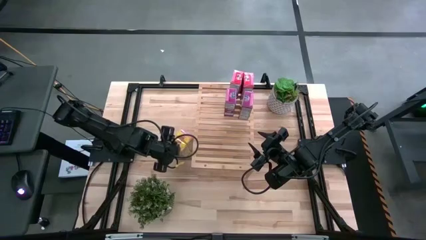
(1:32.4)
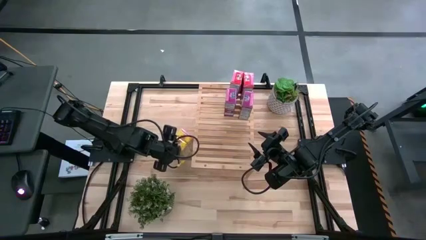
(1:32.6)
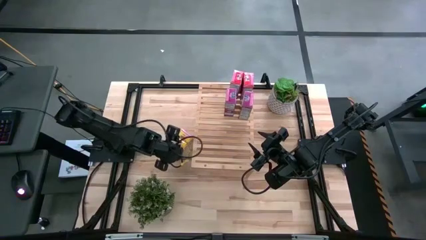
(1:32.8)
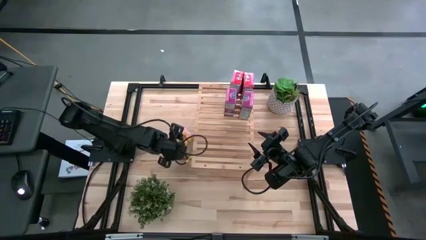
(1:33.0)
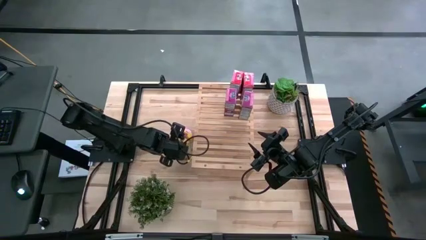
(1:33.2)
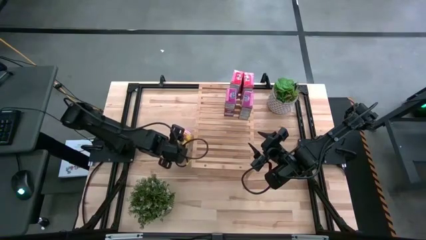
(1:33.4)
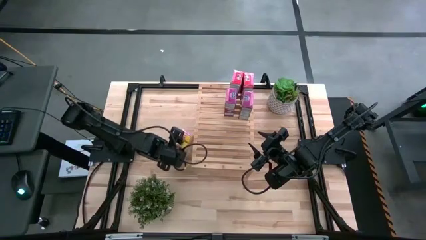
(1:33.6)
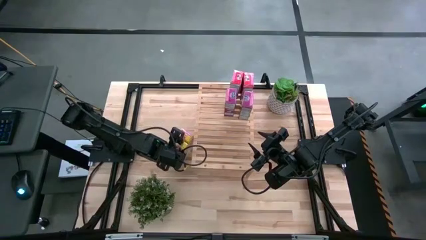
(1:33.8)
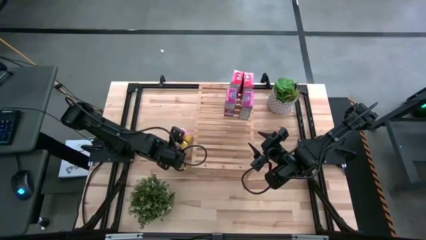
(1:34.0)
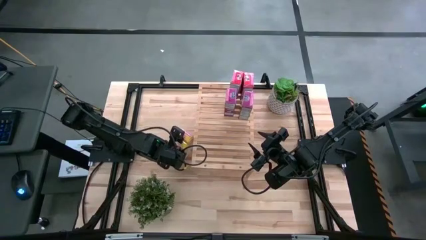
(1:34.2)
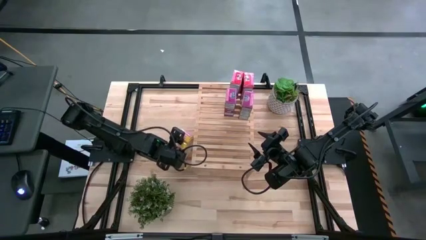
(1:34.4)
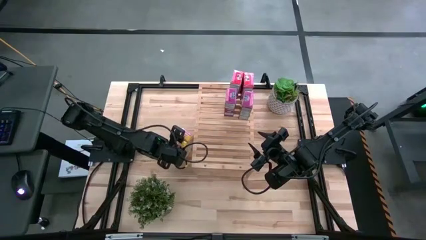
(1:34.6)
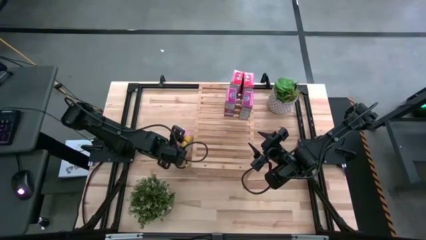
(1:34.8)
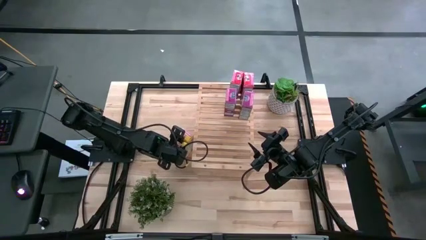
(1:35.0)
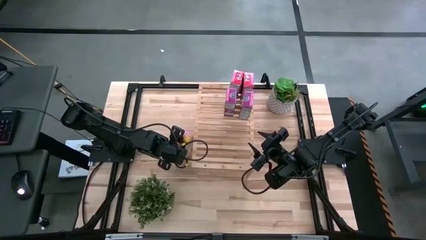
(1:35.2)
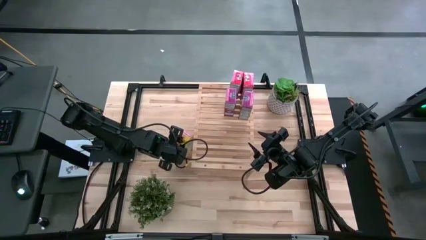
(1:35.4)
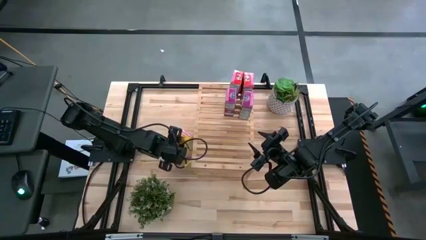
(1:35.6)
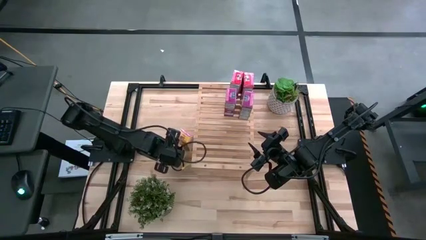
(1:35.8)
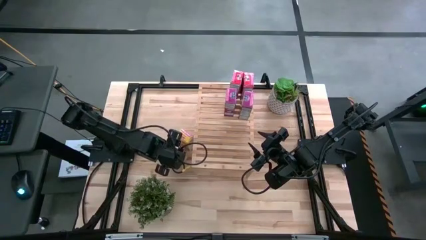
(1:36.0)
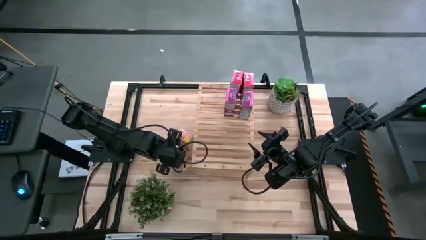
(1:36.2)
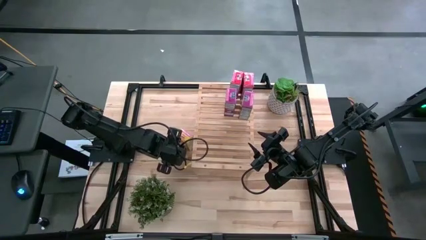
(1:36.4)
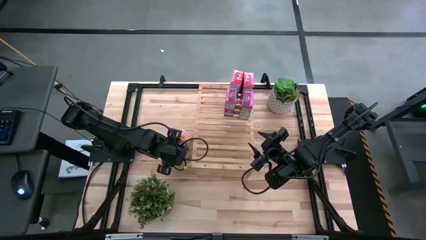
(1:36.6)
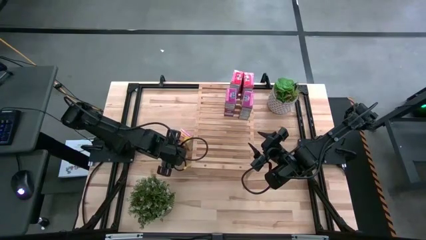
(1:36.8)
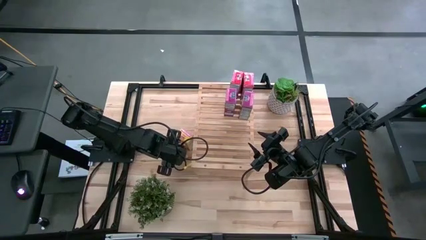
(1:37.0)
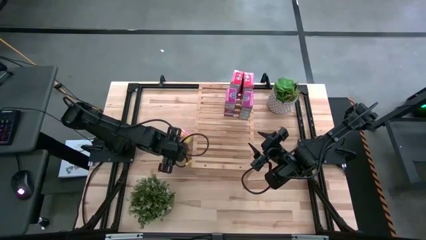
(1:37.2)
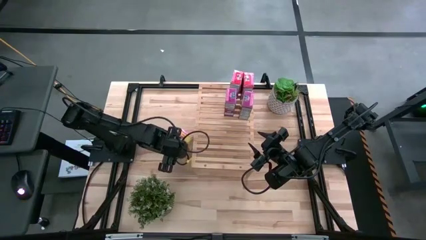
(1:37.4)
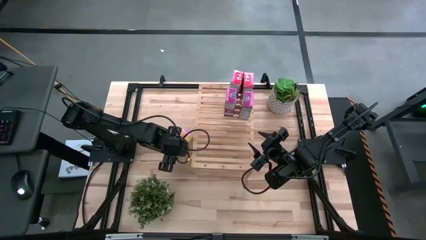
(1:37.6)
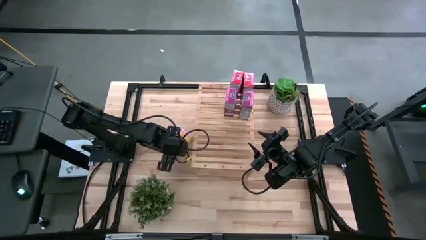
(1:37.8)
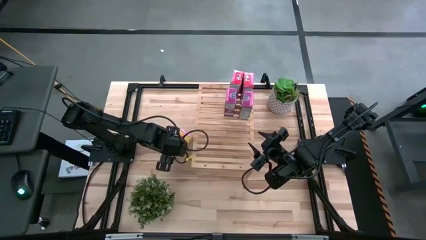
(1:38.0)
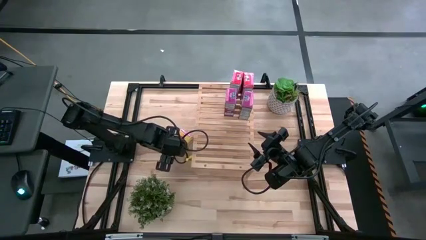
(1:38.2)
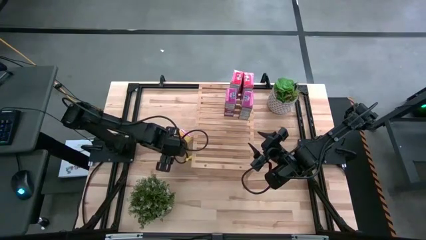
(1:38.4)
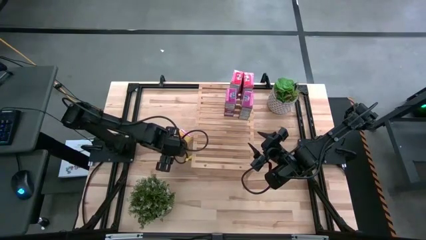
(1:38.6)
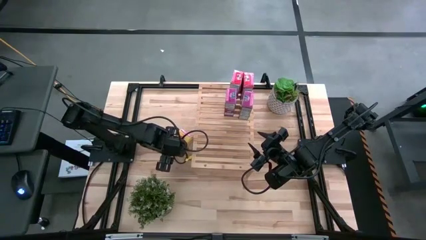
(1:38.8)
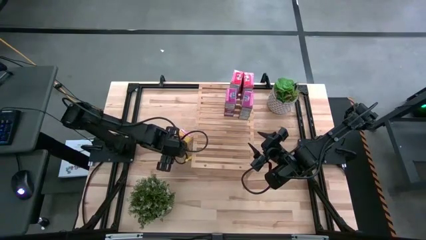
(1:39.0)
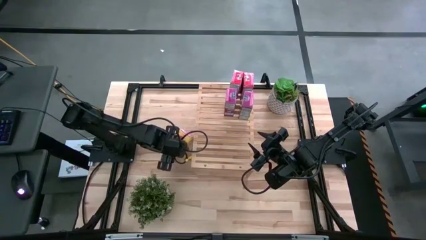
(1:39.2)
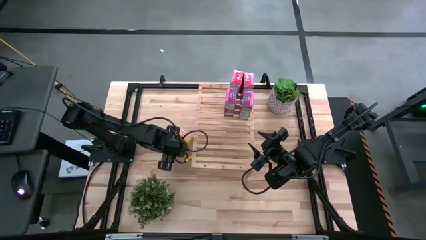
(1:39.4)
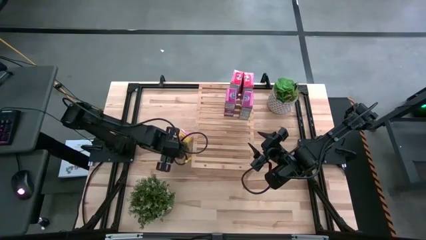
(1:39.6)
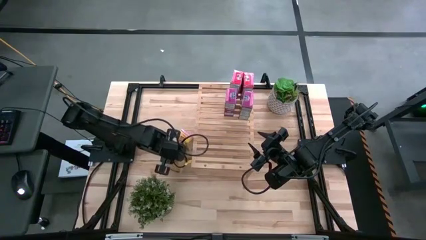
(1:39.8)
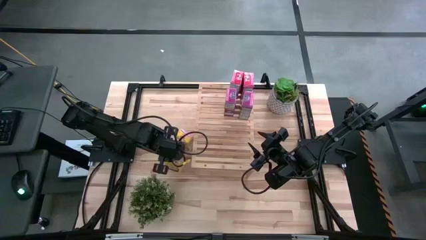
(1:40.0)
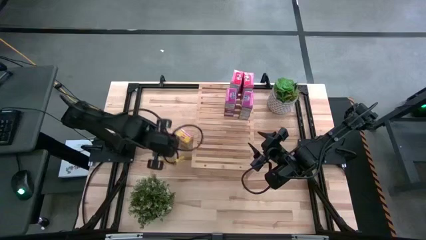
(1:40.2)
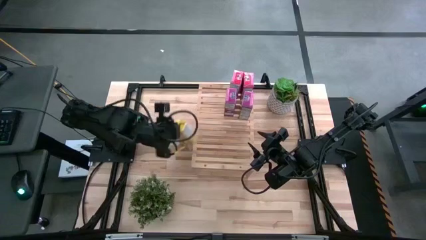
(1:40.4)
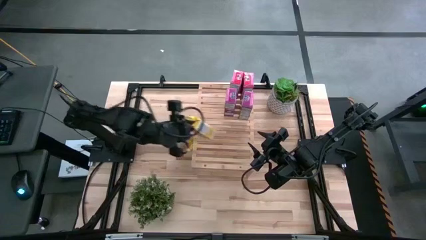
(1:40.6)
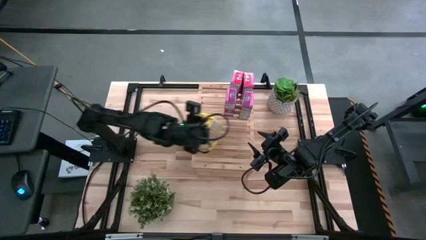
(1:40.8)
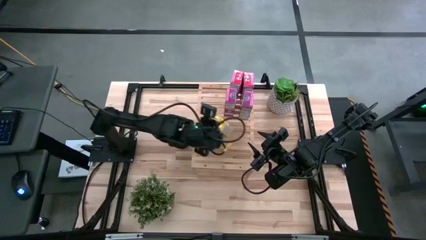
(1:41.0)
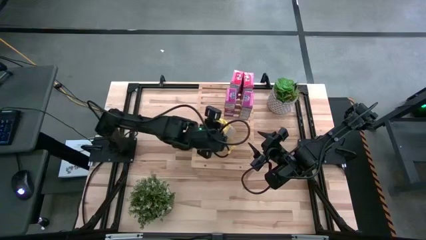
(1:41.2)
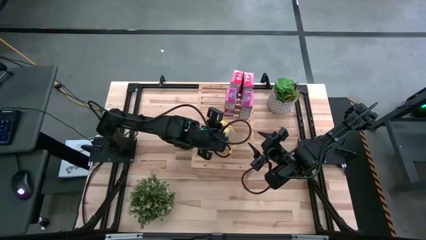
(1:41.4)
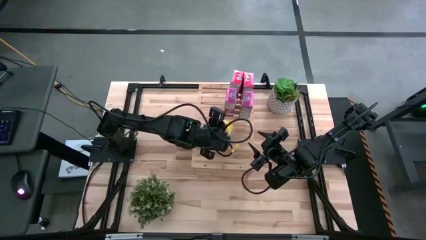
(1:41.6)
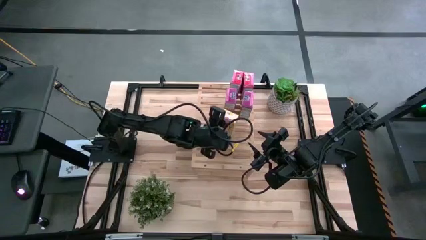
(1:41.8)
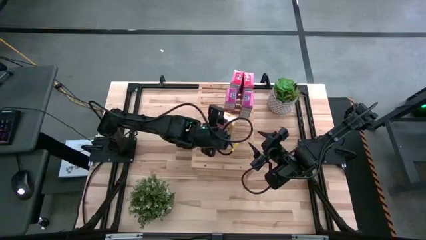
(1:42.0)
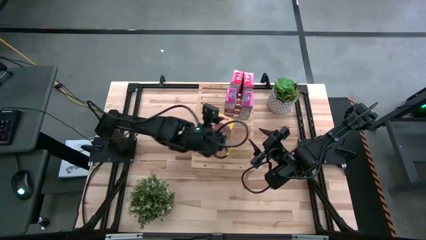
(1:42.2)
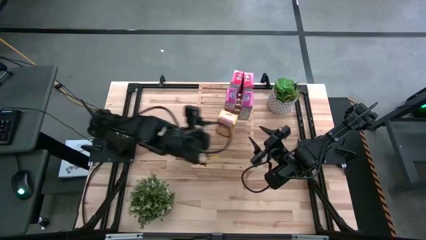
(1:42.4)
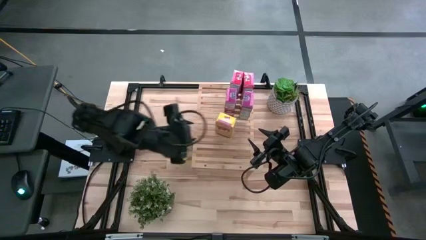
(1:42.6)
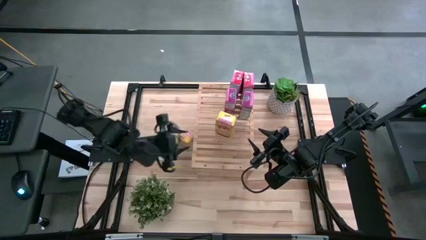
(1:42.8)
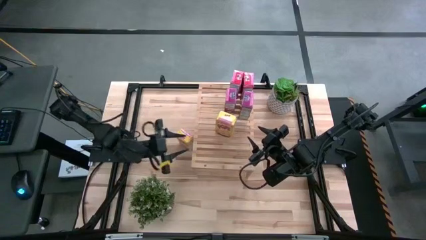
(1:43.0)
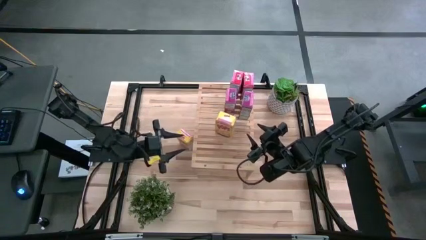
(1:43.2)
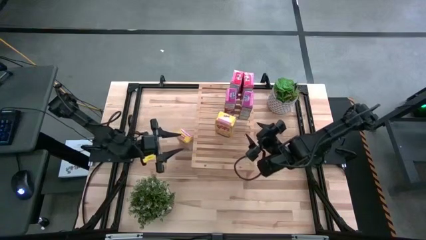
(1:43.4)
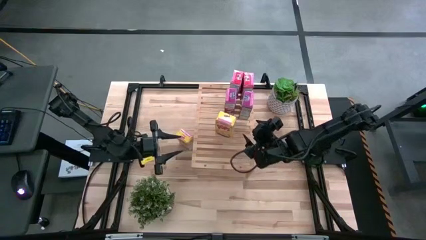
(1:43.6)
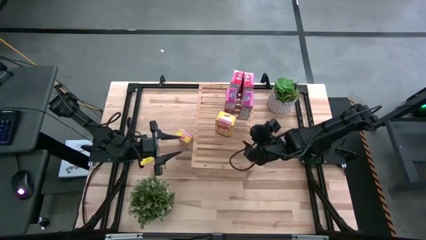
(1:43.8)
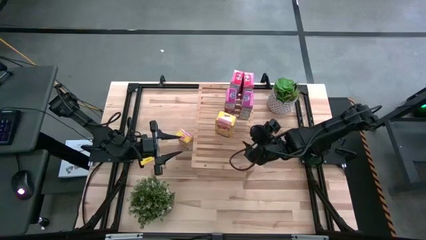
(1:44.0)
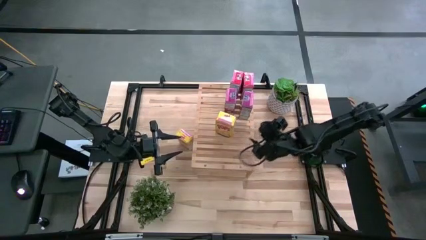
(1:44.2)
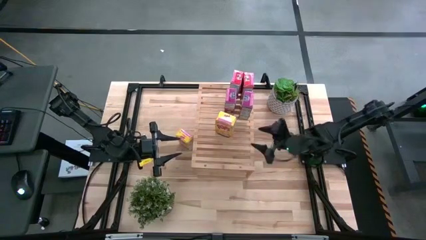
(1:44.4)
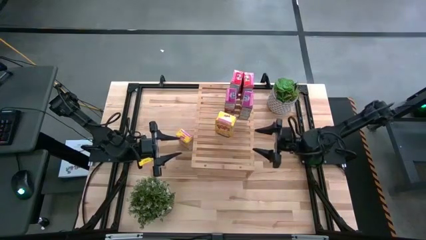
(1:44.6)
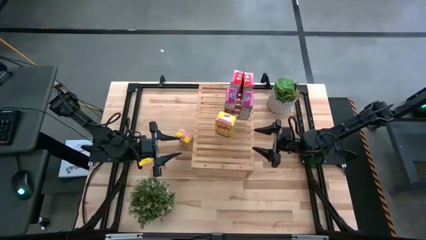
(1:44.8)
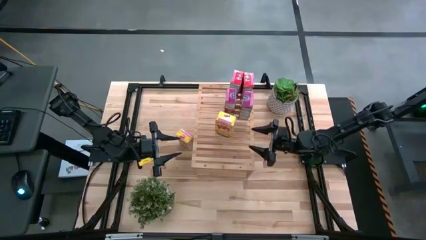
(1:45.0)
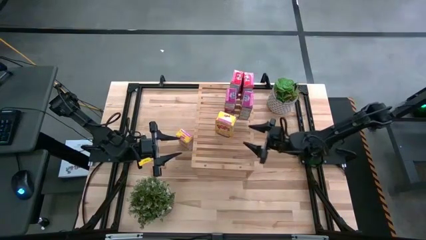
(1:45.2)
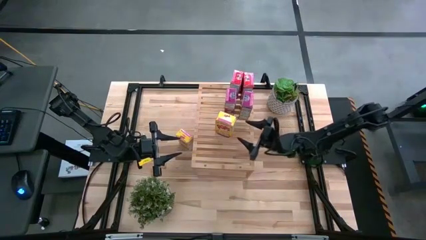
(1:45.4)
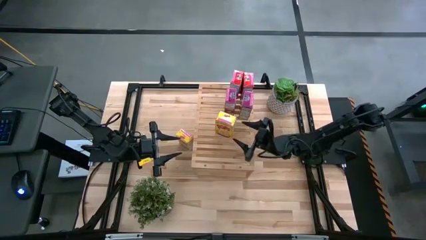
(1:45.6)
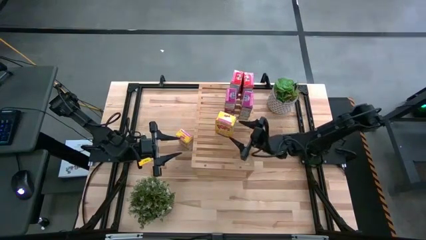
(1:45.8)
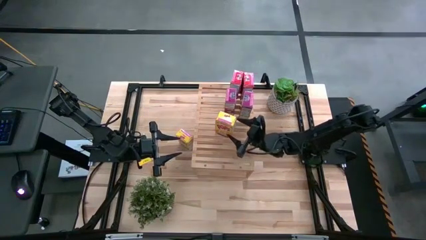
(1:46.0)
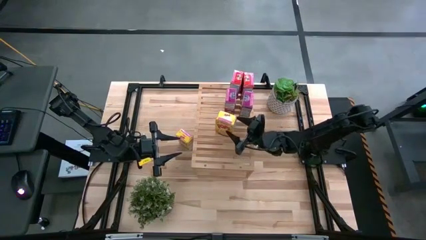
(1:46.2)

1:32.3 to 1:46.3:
Task: Stack cereal on shelf
Put the bottom yellow cereal box on the shelf

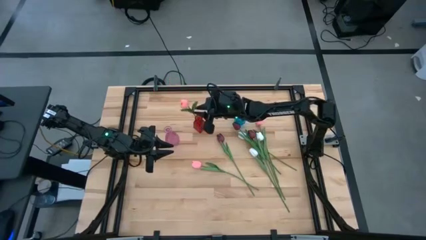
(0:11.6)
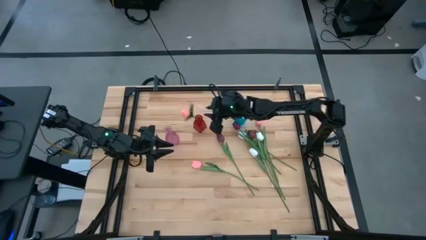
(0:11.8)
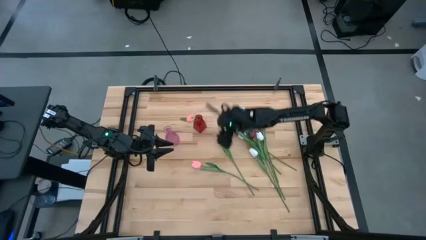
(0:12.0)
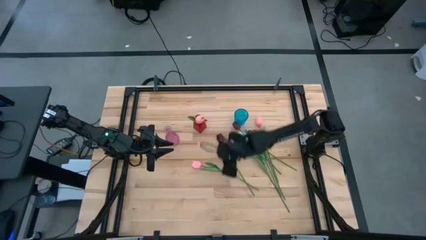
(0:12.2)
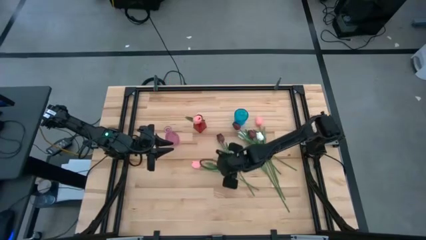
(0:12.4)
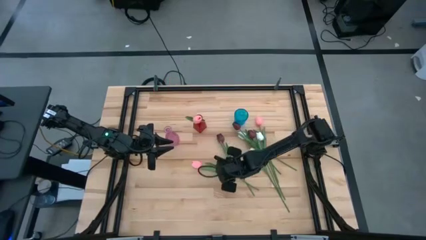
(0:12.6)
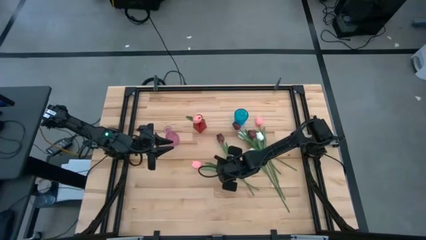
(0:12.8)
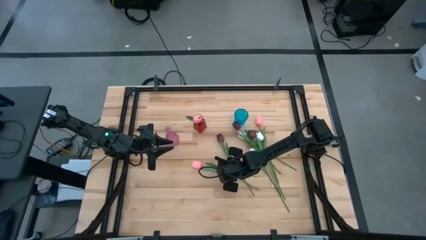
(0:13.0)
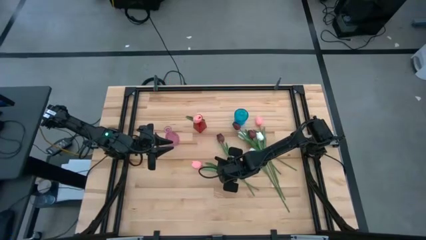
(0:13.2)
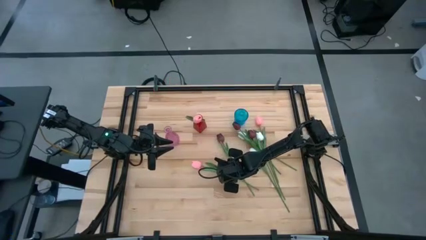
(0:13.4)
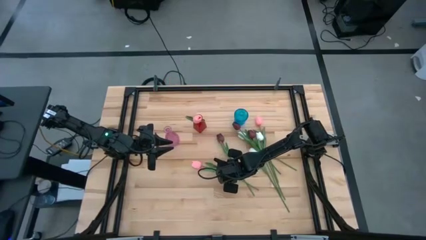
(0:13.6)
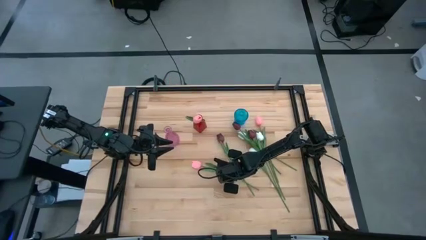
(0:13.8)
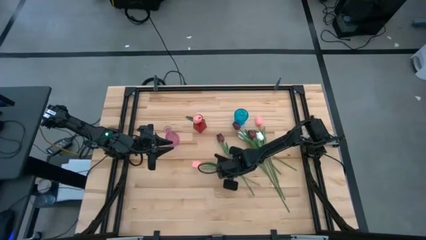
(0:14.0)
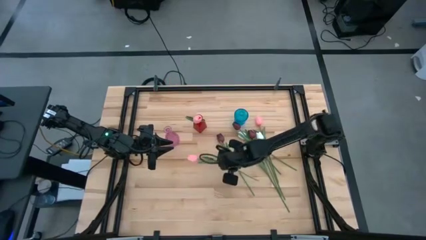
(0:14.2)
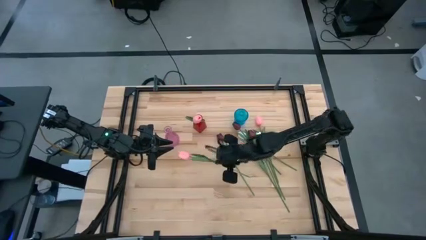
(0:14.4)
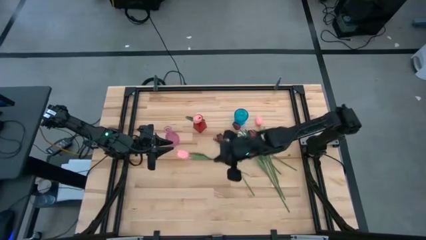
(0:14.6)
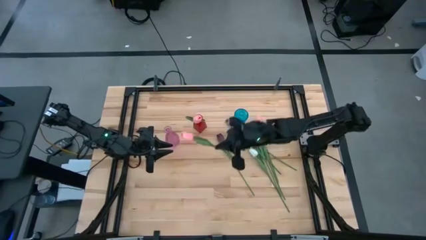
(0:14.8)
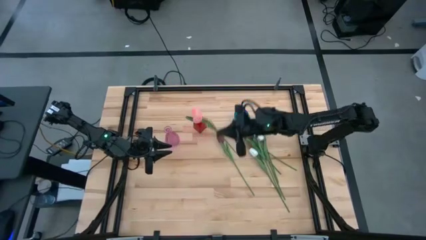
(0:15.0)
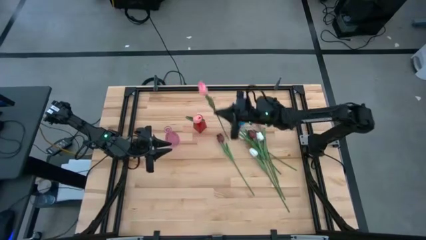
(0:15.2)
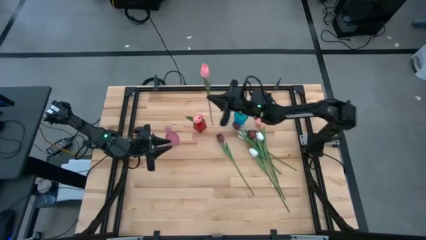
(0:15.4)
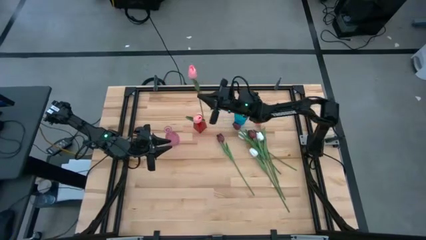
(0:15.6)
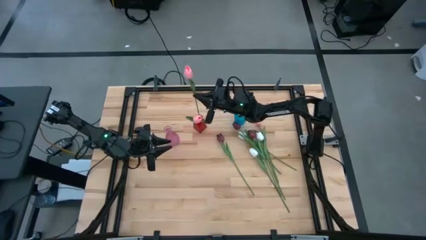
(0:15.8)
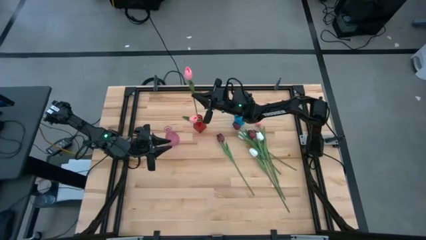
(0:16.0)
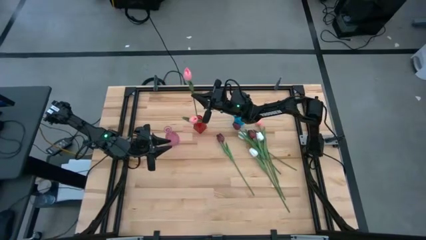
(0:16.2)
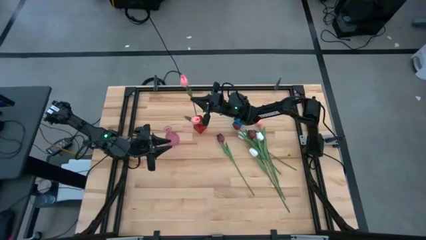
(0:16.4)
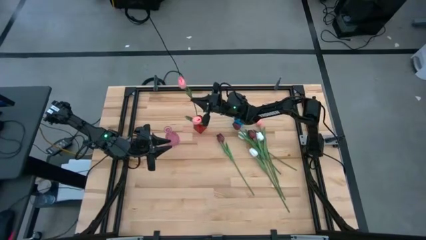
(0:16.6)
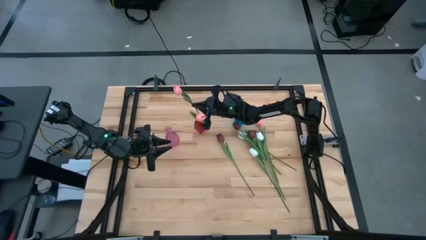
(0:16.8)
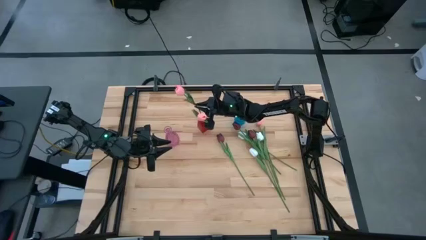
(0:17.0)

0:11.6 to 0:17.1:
Task: Sort flowers into vase by color
Put the left pink tulip into the red vase
